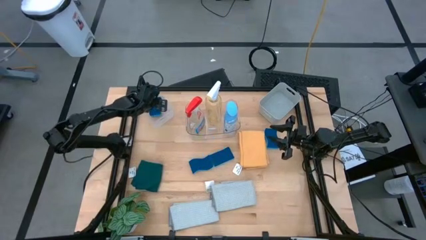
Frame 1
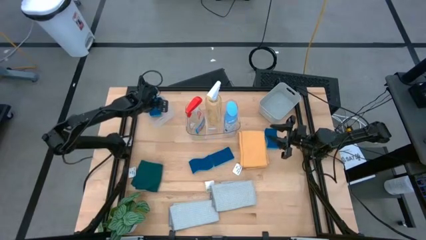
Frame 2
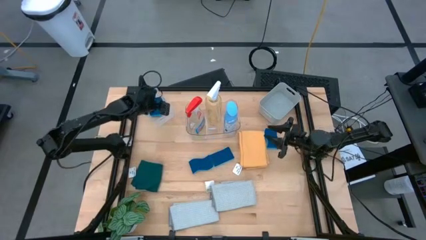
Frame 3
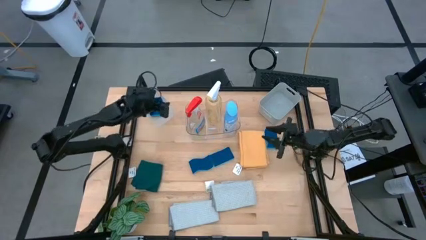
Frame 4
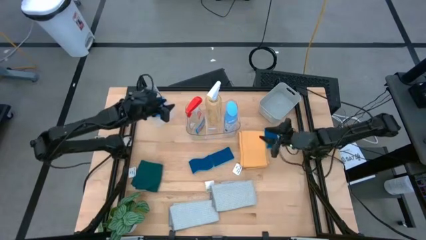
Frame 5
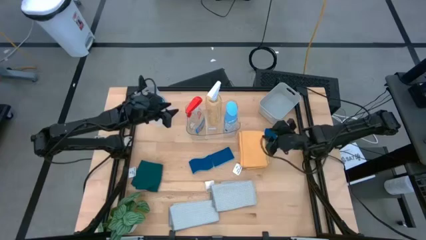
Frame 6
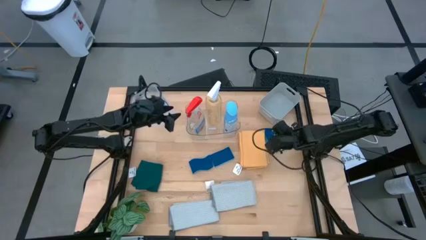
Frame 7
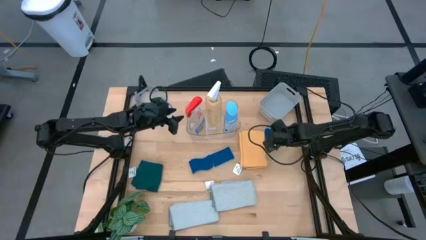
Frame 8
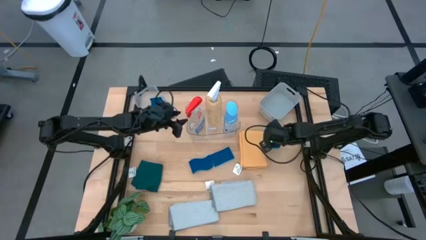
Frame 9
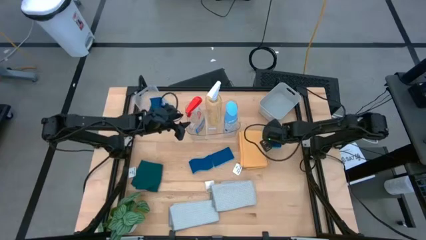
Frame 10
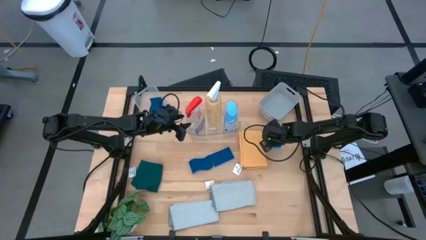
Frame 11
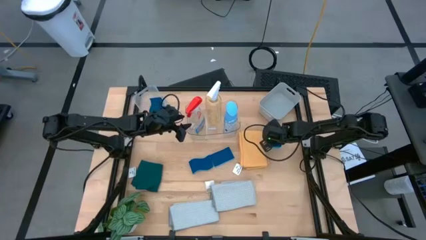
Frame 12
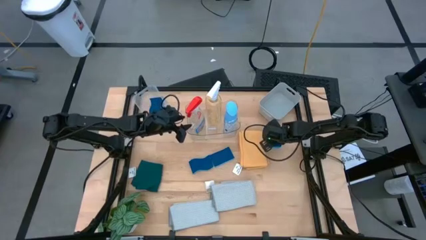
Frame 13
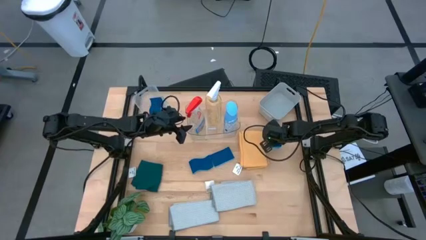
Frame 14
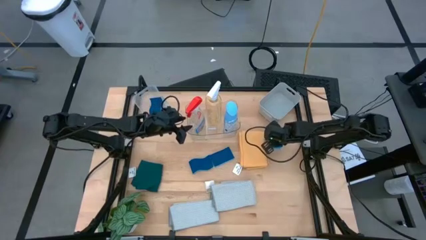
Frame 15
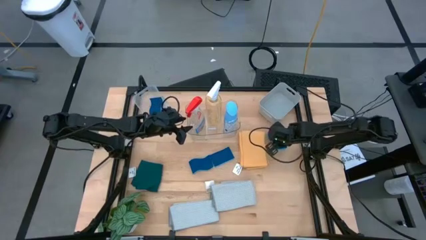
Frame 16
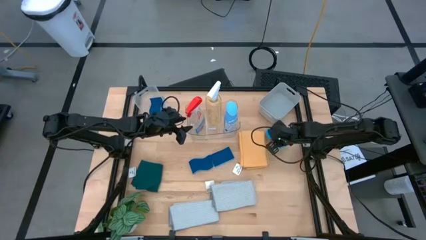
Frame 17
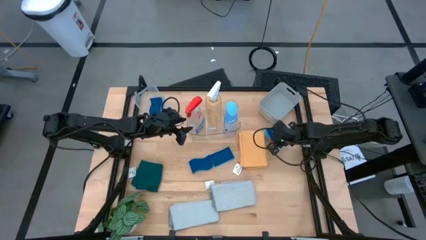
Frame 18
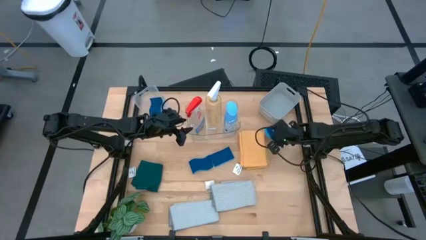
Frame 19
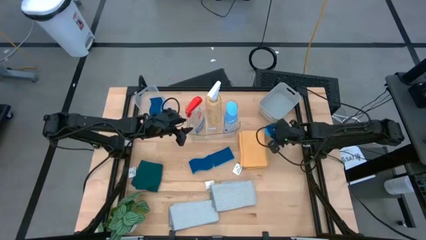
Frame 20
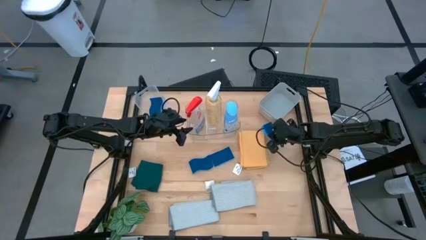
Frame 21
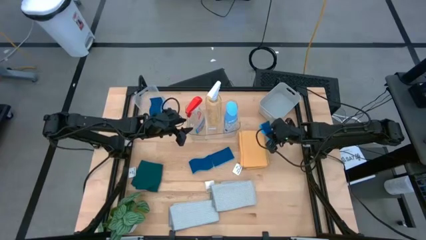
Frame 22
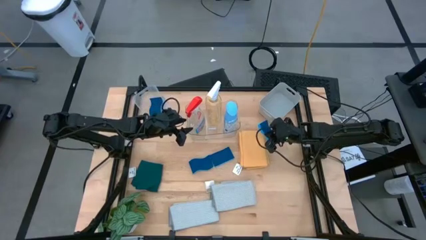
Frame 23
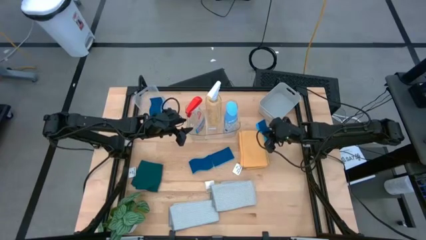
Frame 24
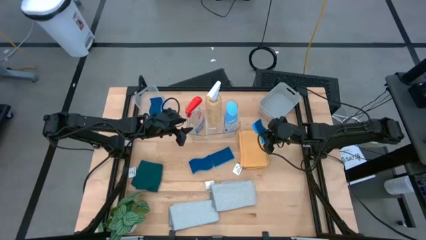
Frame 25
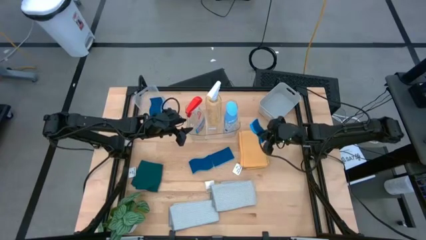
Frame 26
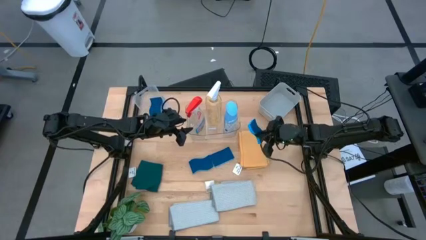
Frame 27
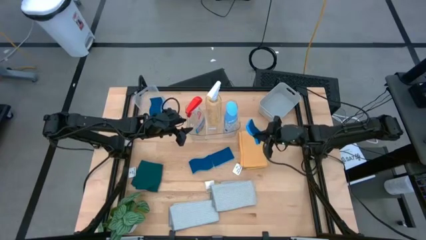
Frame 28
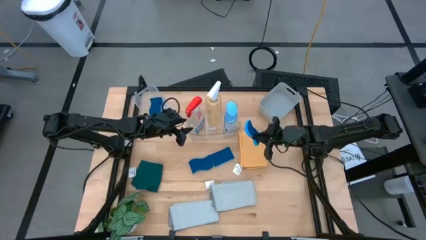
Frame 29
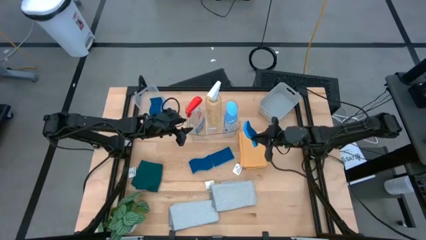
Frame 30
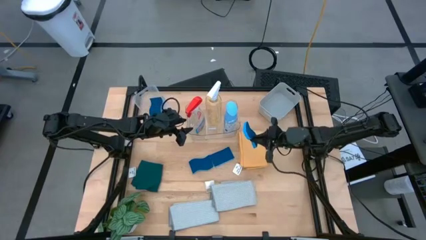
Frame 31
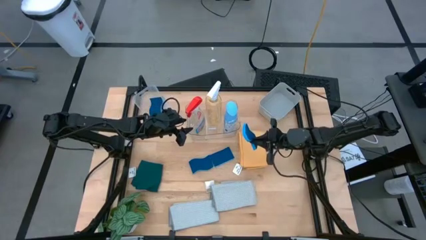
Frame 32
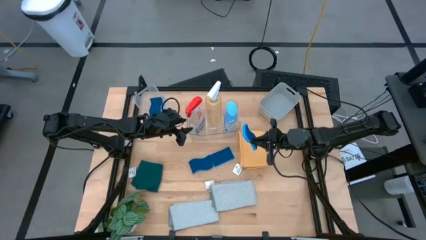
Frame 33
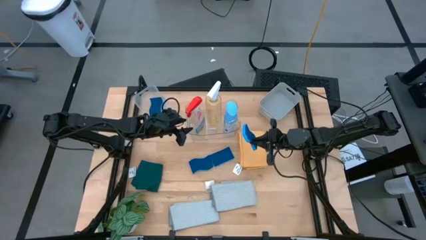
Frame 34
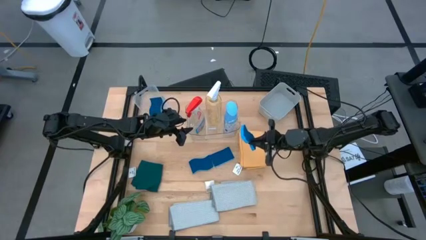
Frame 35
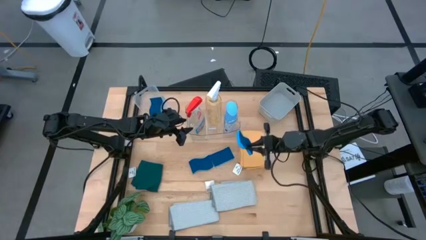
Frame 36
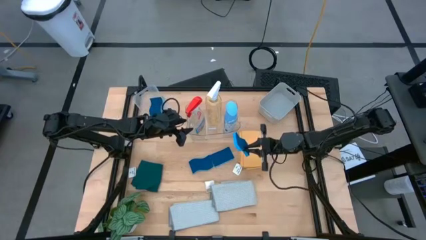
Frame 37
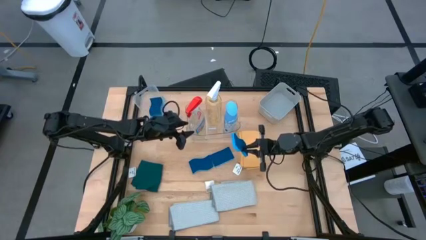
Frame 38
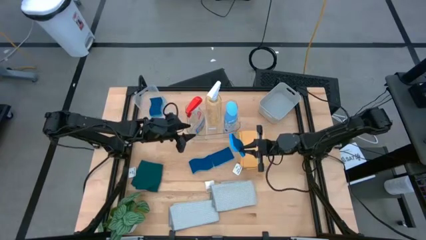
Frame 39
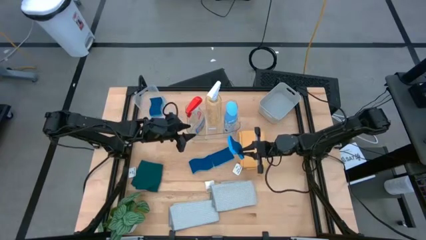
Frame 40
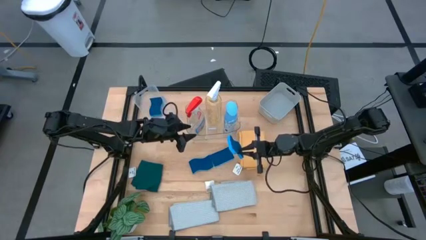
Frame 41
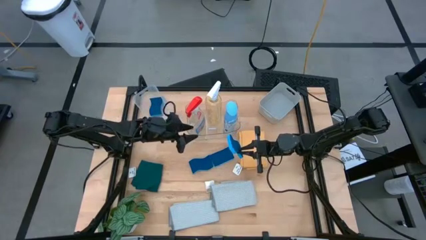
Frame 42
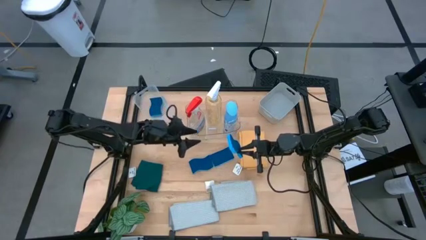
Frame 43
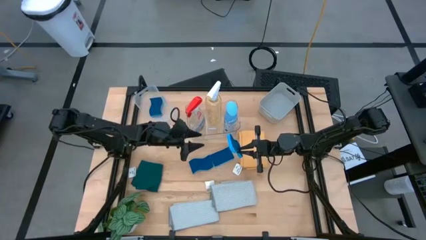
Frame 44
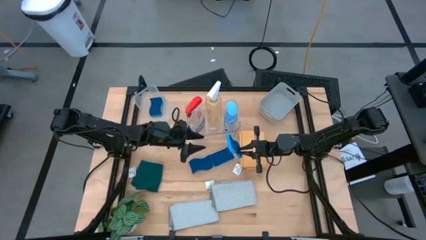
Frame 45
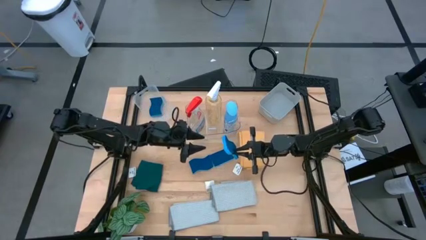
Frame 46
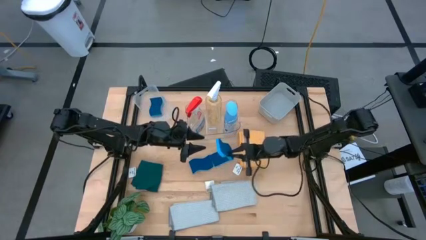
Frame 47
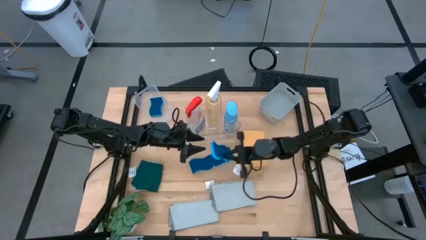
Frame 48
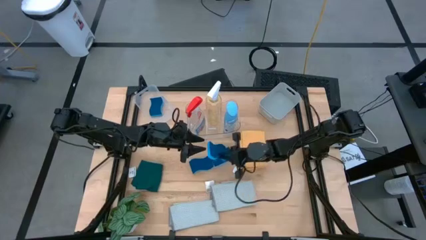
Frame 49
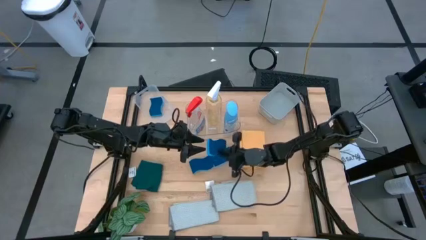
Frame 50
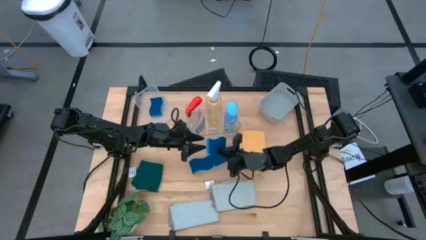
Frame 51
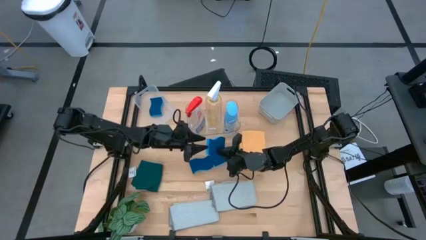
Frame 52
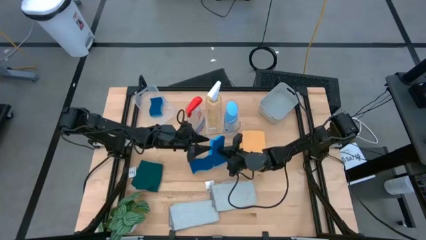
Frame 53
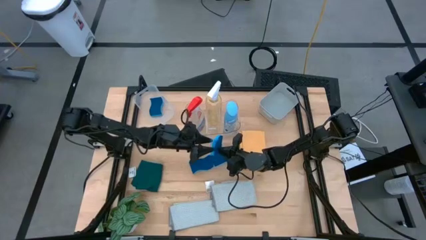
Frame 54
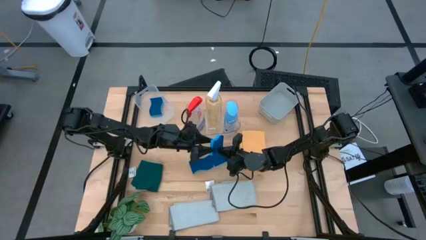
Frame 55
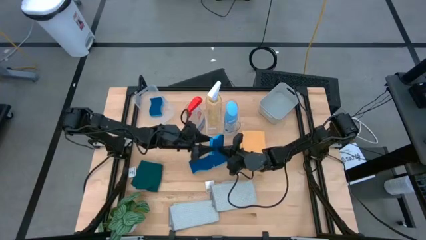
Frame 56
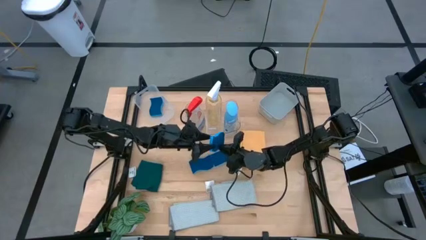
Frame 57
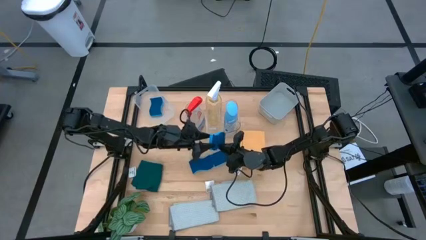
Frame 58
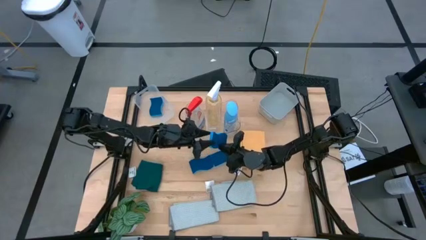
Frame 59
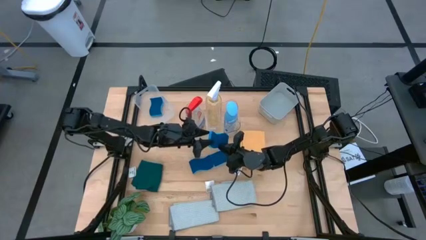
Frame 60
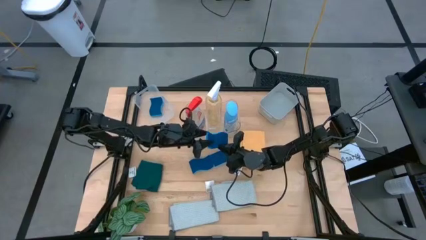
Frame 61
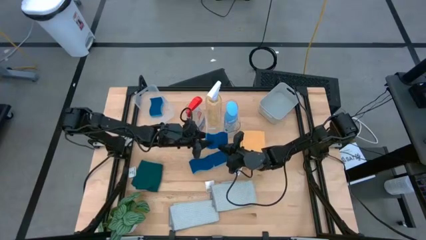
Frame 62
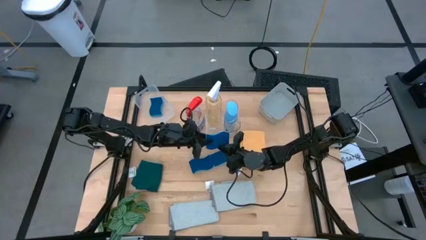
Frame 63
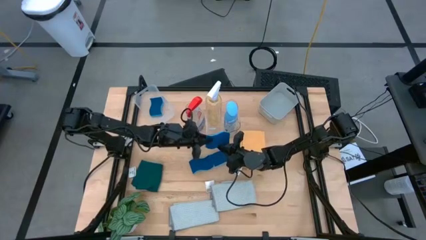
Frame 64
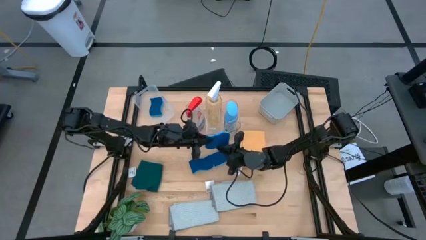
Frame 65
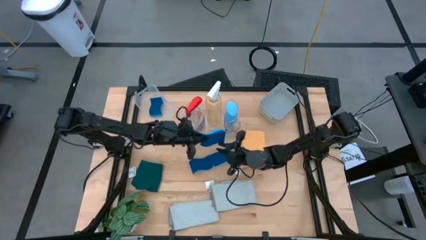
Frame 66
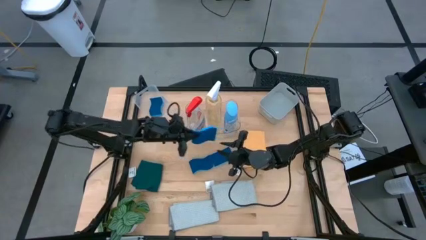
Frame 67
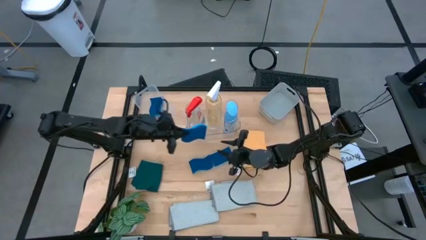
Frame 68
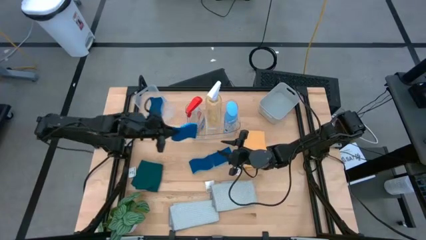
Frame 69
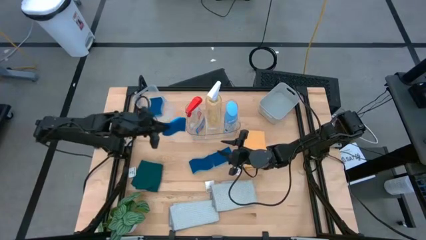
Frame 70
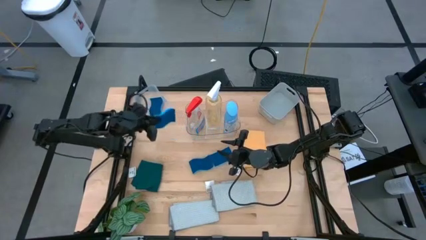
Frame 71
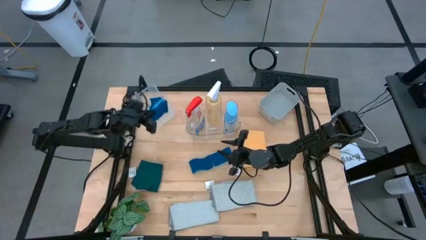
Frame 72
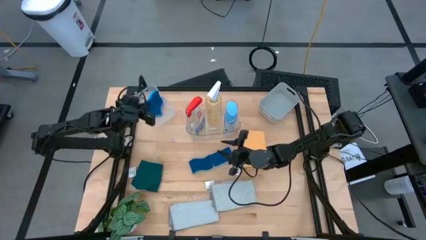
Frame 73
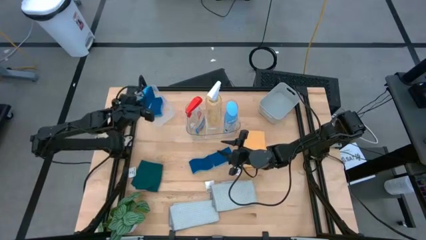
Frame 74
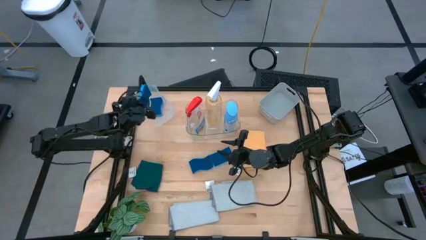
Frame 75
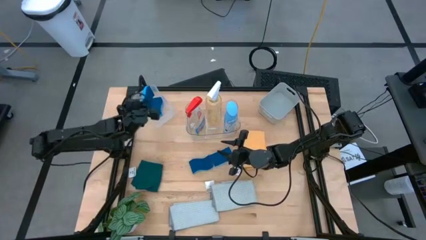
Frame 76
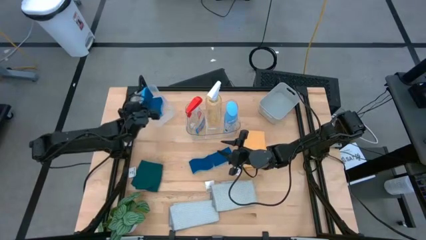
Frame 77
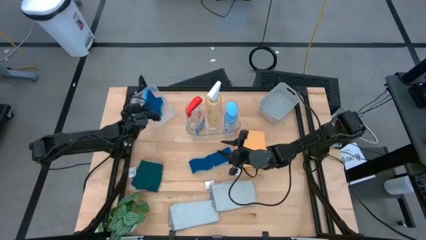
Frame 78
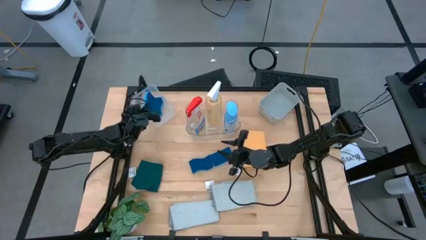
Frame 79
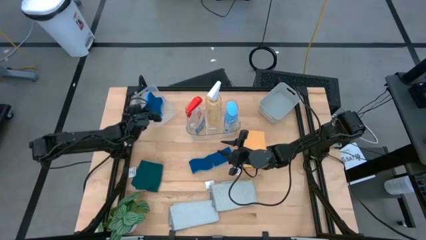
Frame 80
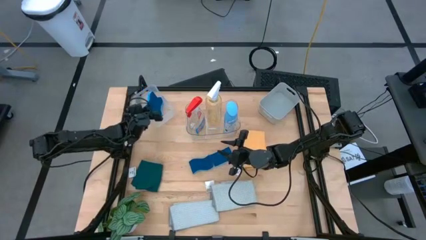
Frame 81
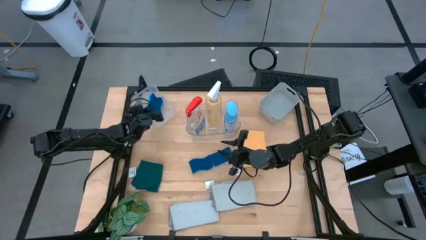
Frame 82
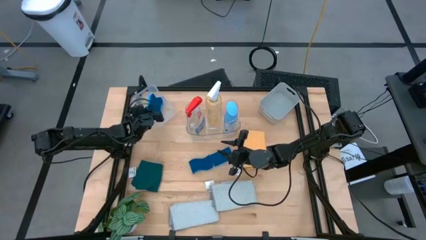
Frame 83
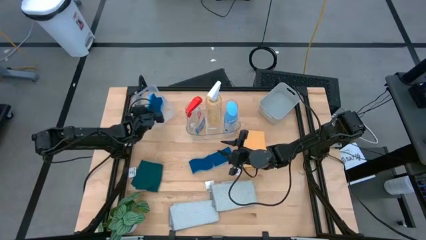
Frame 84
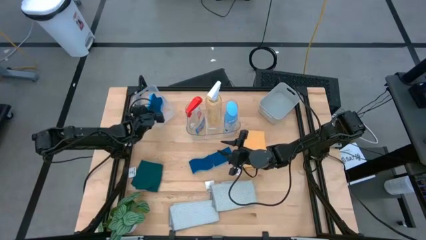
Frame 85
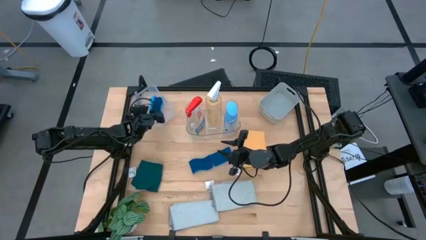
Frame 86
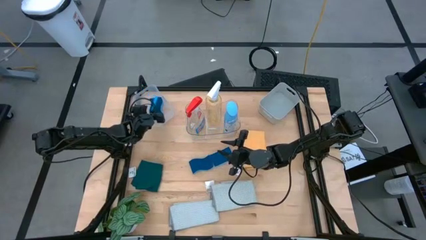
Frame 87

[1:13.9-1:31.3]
Task: Pick & Place Kitchen Items
Put the blue sponge into the white bin
